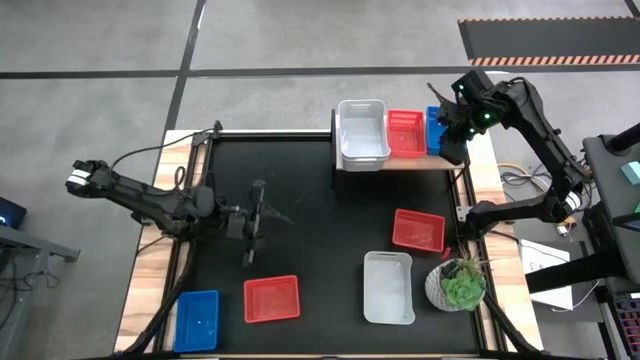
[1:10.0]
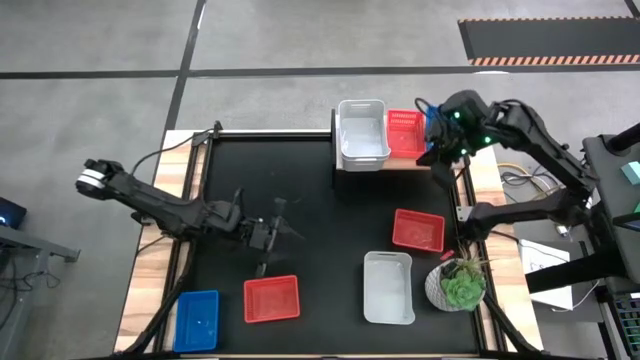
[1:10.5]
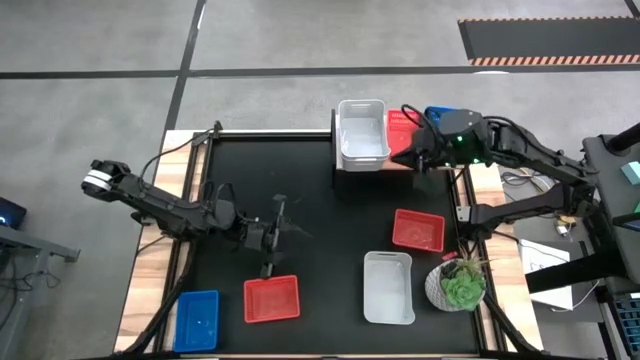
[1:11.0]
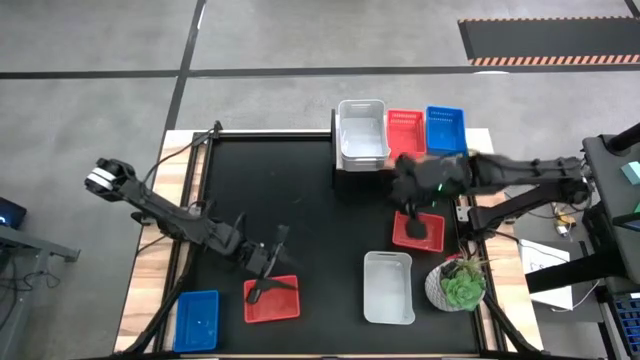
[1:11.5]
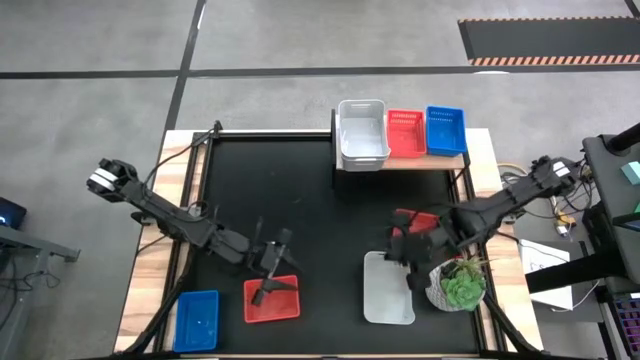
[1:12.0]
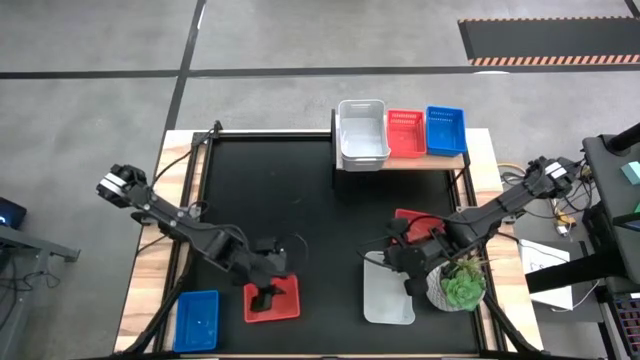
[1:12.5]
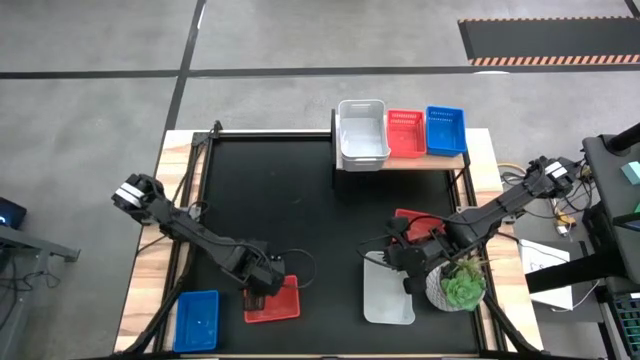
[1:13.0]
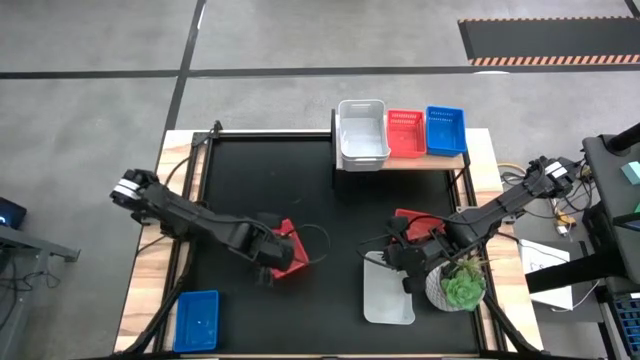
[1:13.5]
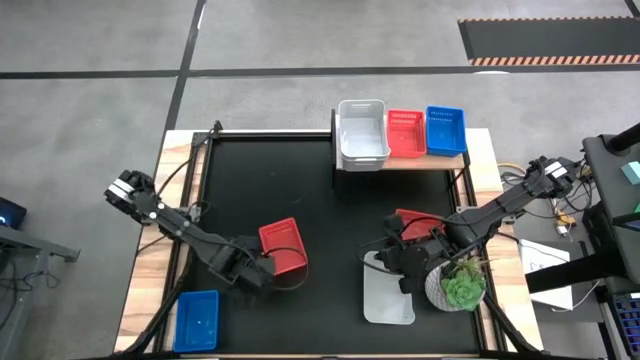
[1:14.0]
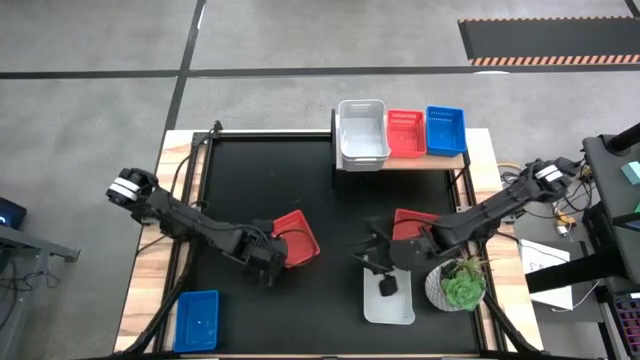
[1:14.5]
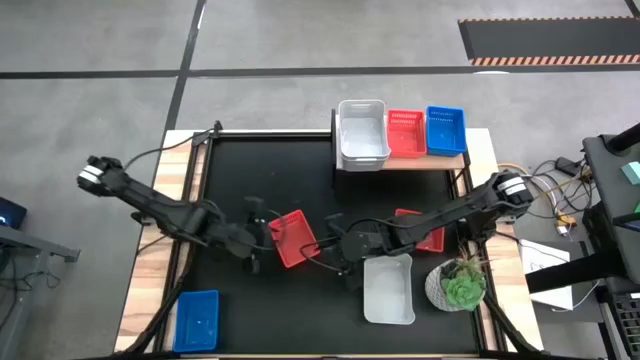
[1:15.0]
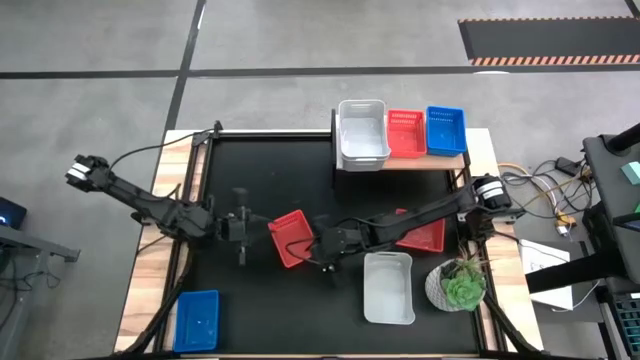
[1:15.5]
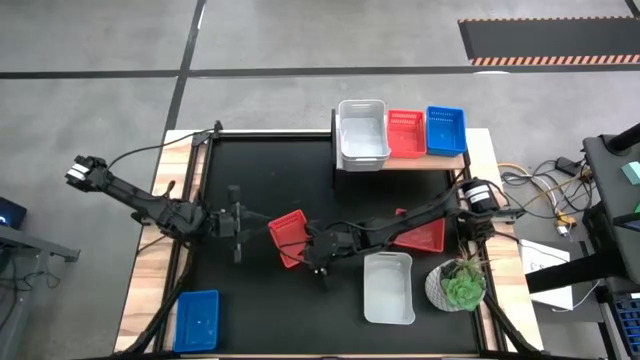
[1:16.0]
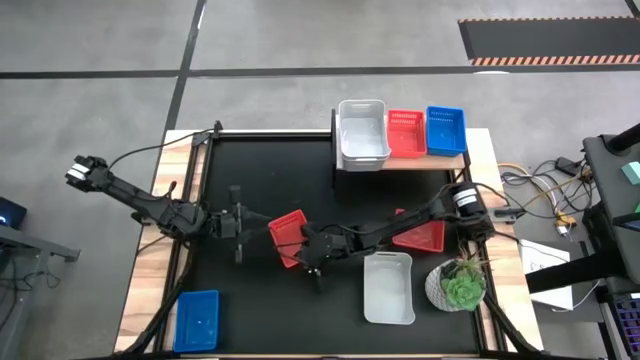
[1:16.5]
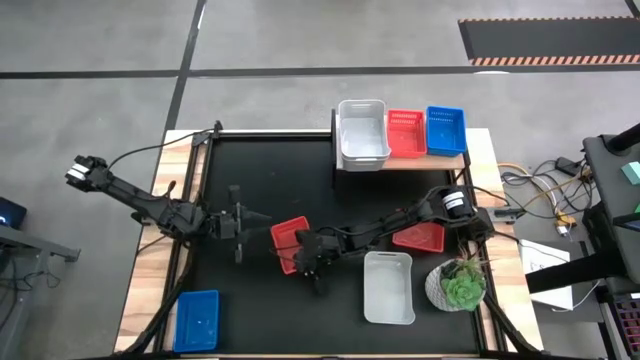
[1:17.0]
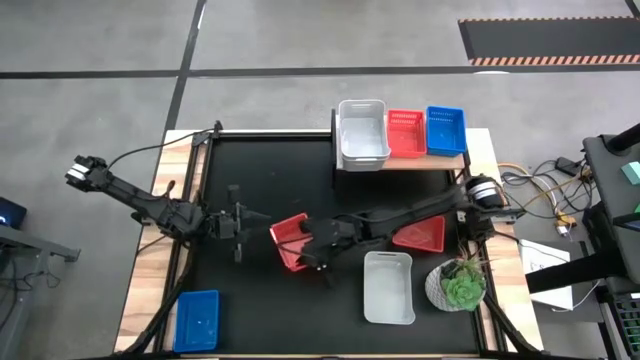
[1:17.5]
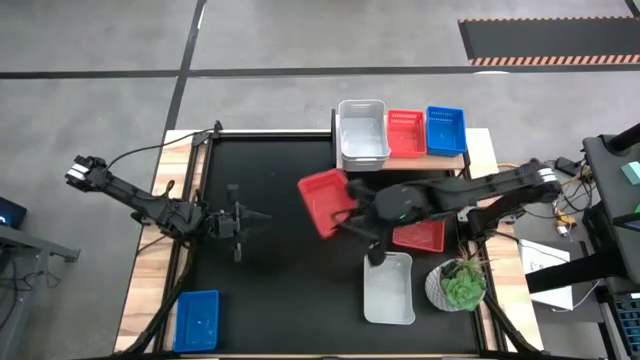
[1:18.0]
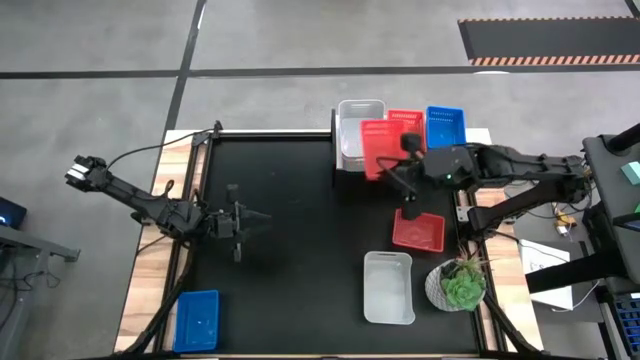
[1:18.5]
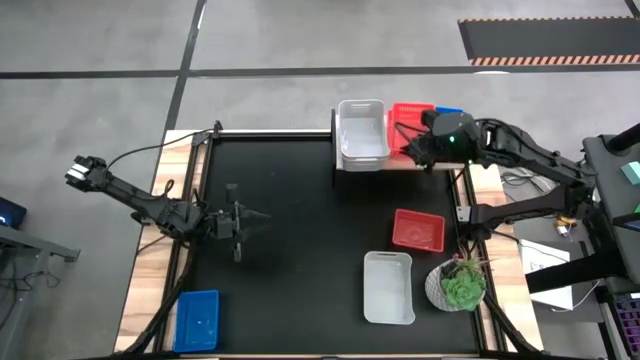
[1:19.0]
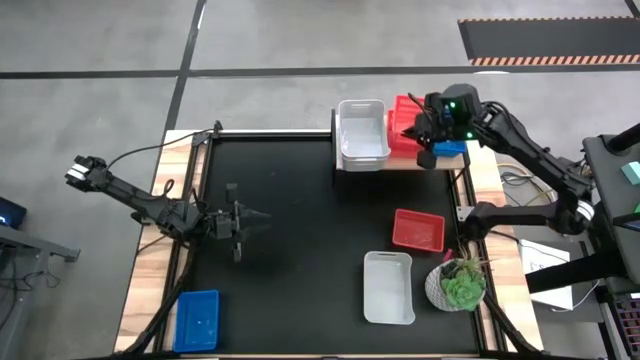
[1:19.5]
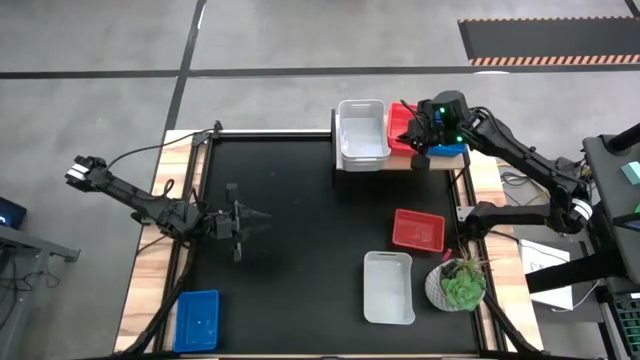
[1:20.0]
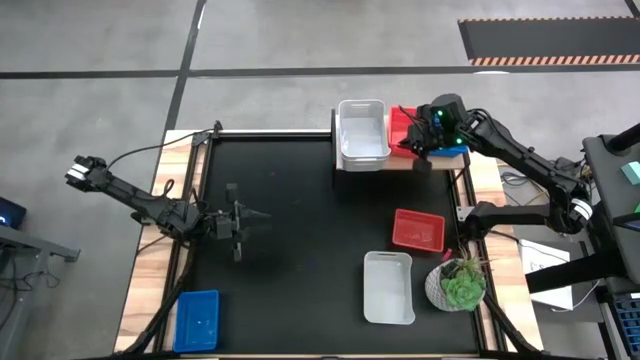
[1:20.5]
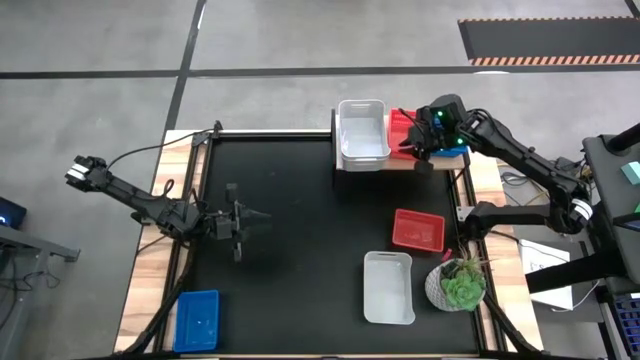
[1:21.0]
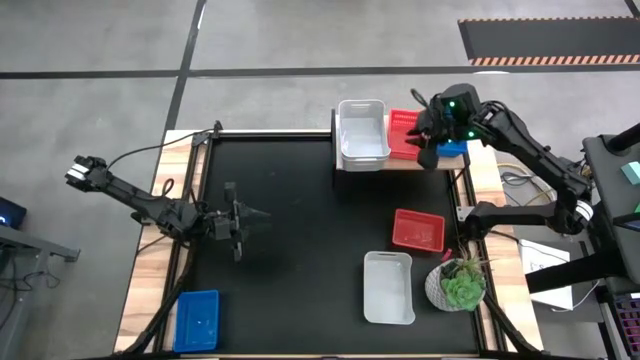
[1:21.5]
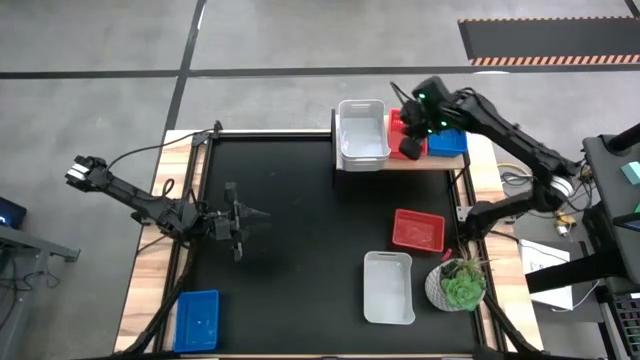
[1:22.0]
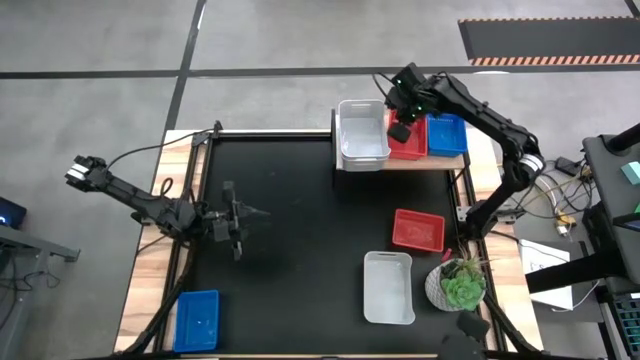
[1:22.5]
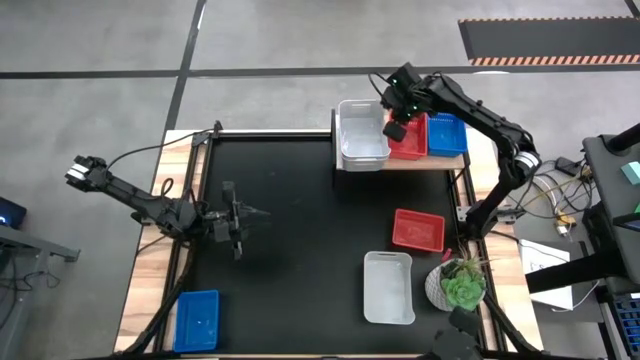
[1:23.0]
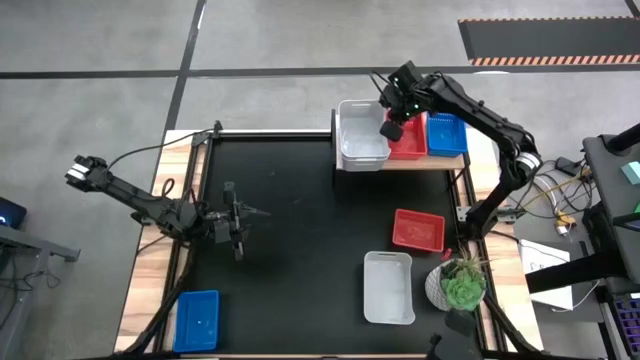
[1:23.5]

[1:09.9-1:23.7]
Task: Stack baskets on shelf by color
Stack the bottom red bin on top of the red bin on the shelf
